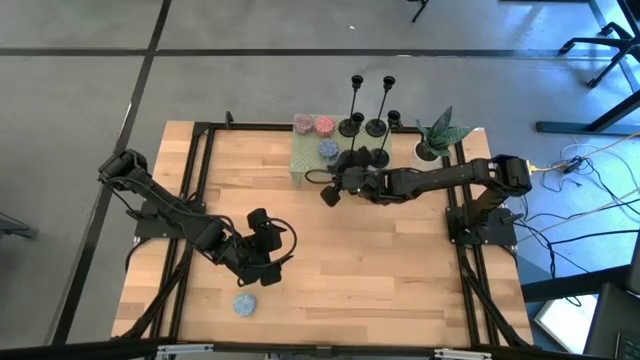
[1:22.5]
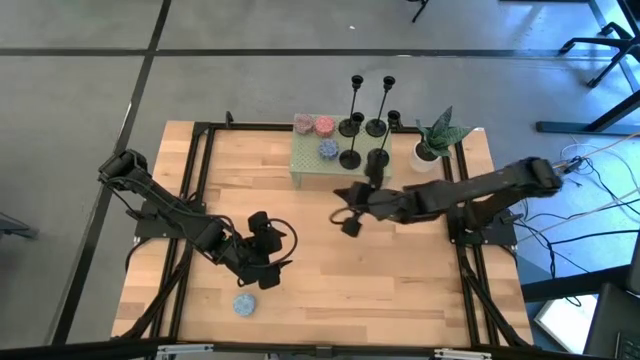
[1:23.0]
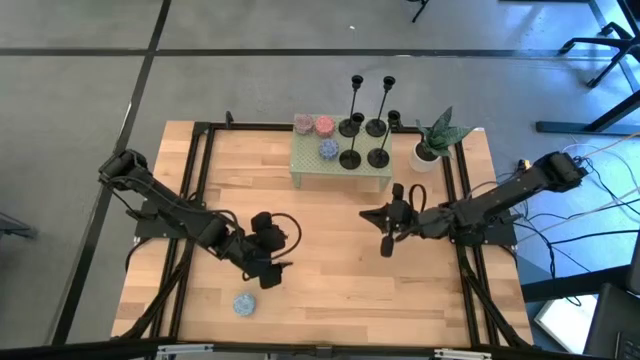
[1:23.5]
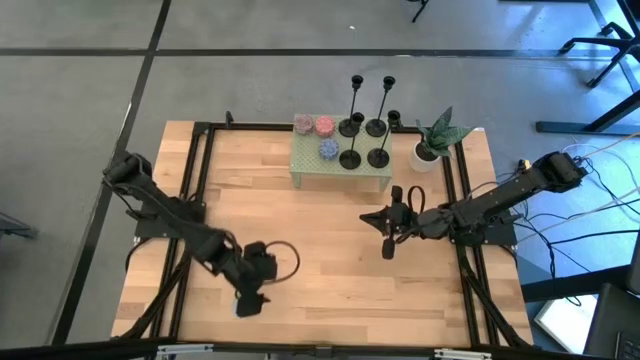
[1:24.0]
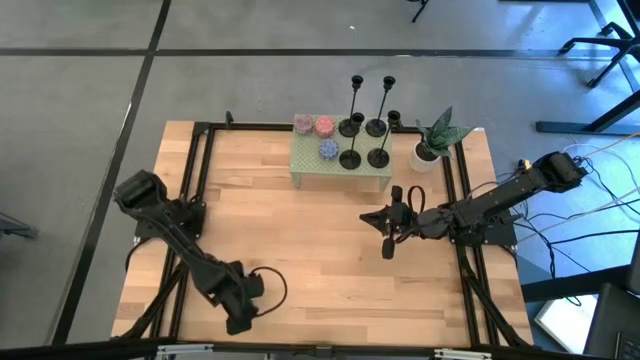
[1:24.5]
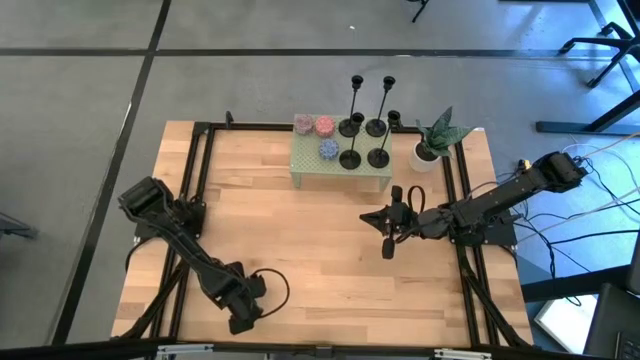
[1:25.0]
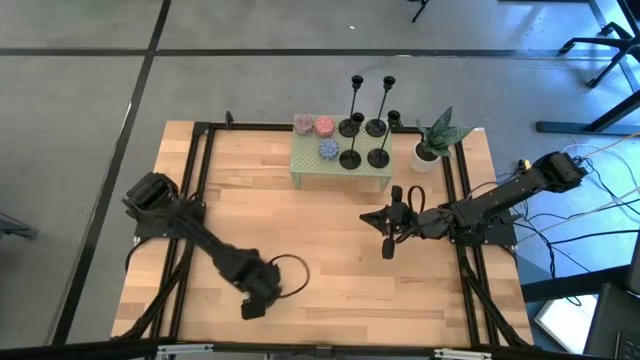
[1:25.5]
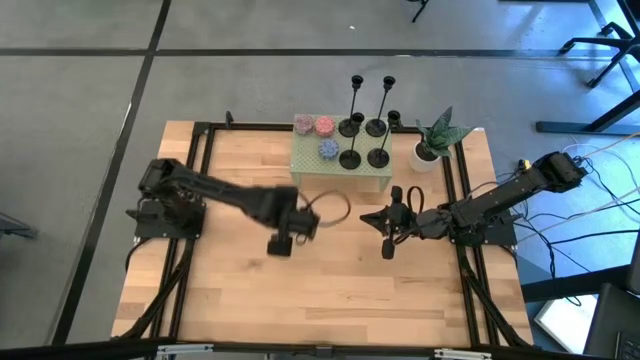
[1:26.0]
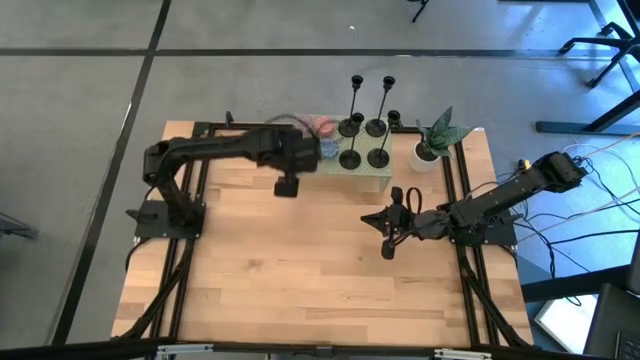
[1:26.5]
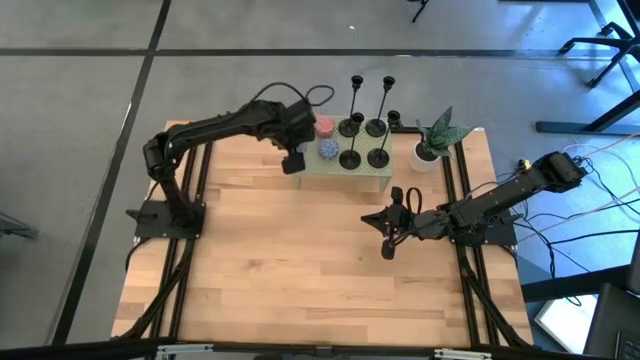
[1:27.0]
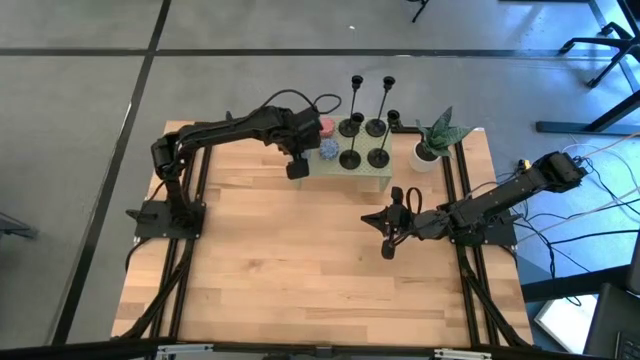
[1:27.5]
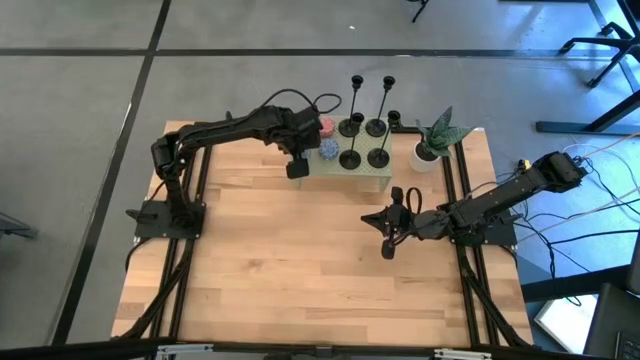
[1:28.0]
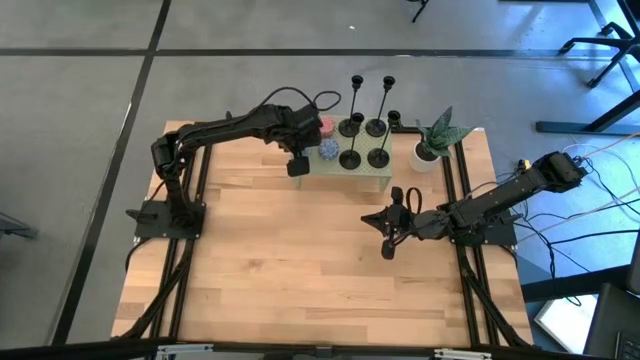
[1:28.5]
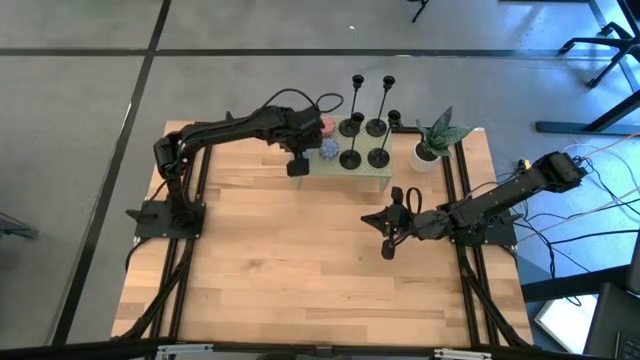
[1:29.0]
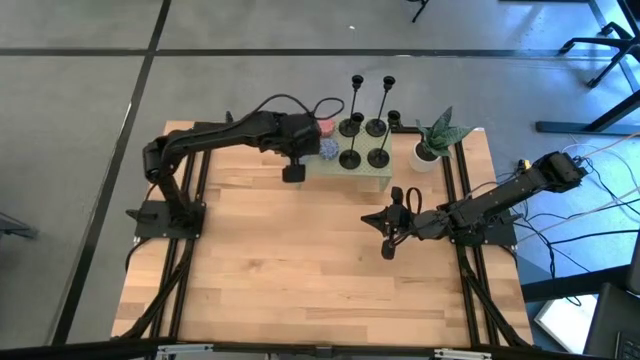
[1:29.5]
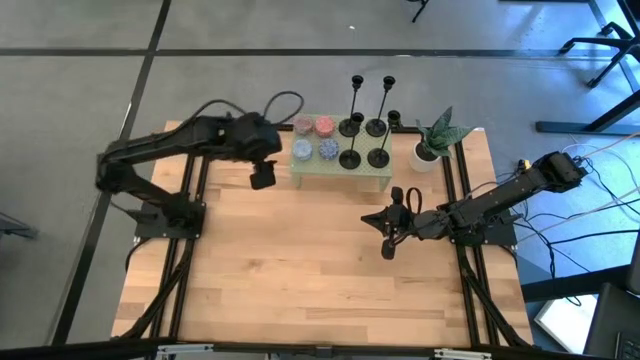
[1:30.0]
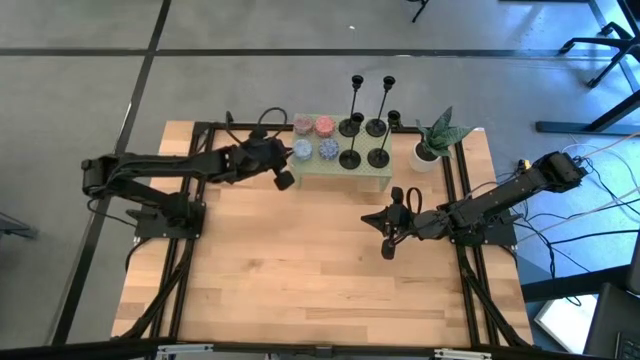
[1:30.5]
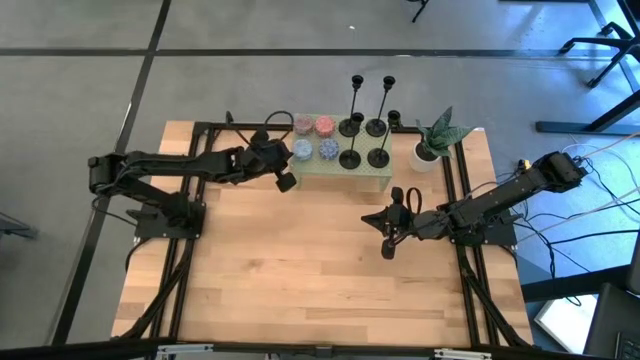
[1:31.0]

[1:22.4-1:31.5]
Task: Pick & Place candle stick holders
Align the light blue scented candle with the red scented candle on the shelf

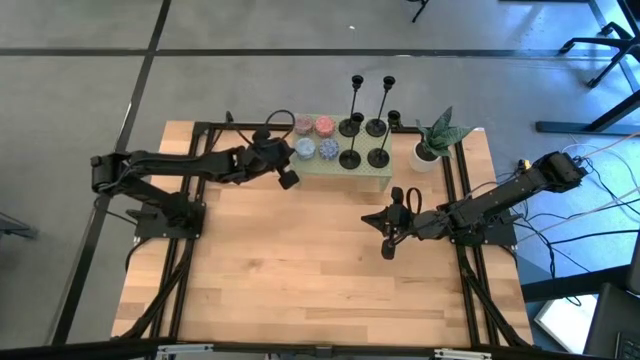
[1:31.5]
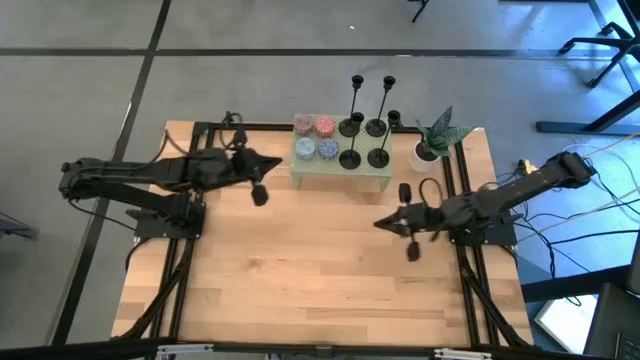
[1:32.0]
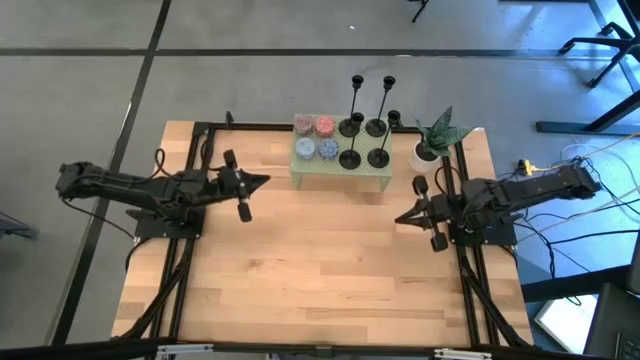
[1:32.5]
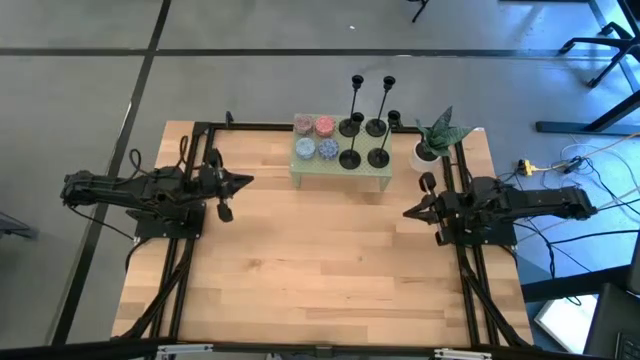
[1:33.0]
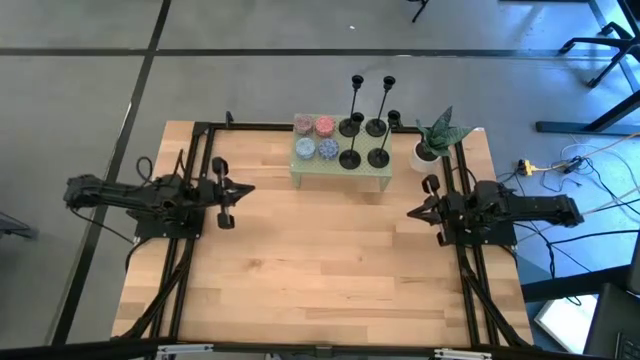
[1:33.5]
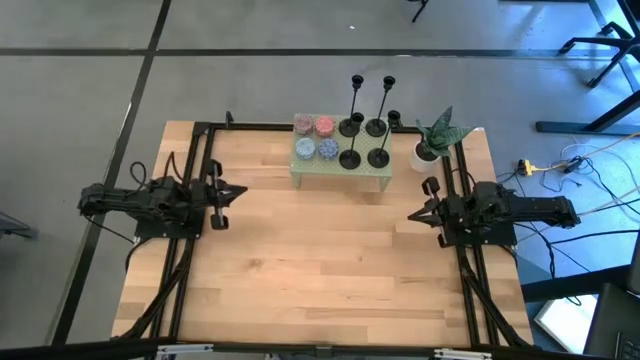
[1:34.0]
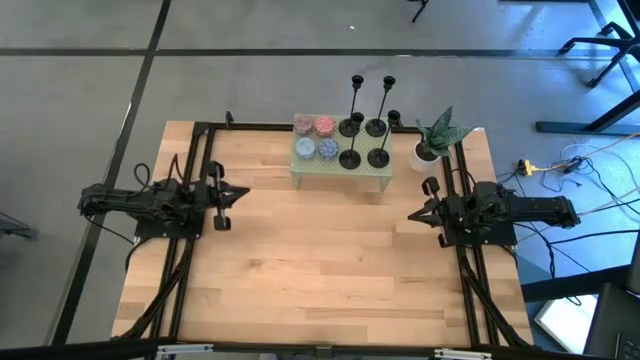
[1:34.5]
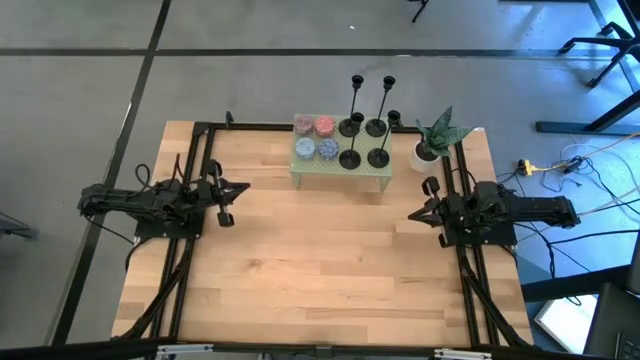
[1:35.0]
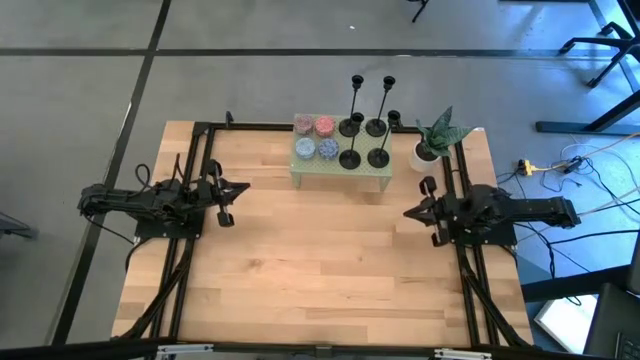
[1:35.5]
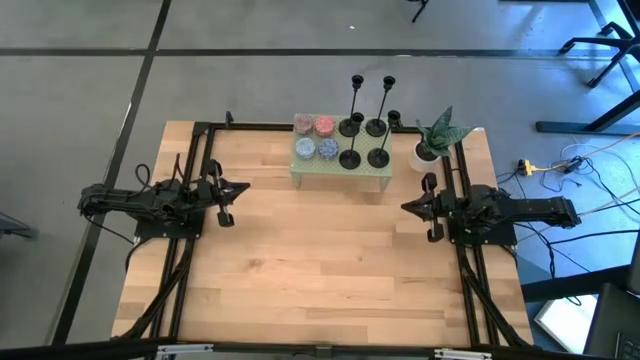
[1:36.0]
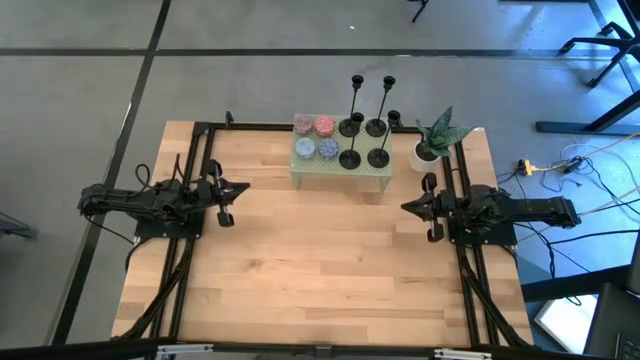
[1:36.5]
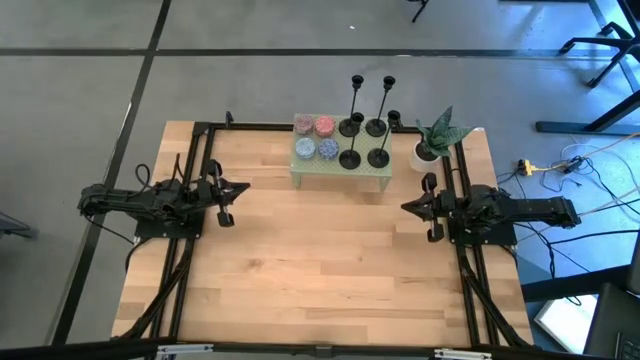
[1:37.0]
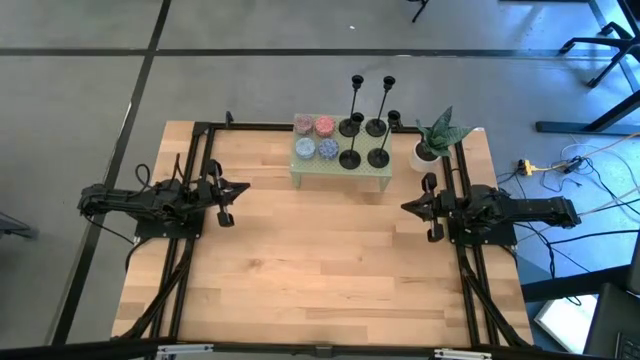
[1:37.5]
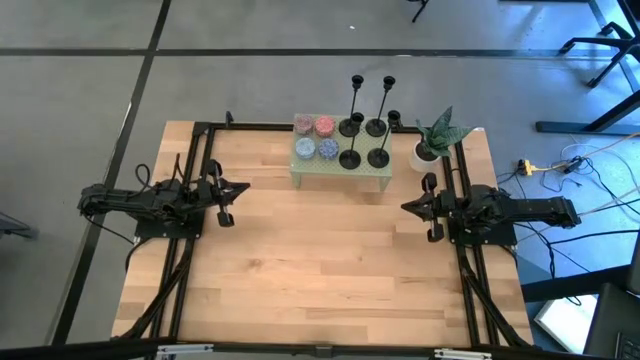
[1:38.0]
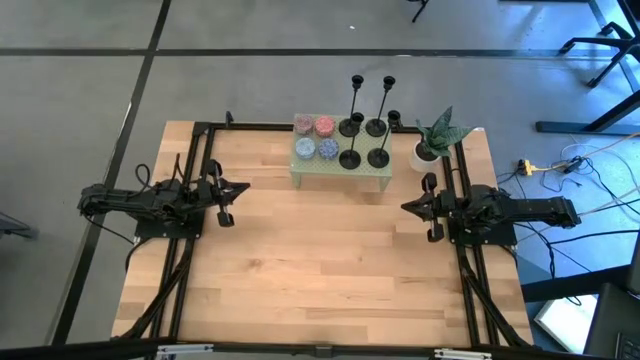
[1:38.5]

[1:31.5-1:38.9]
Return to Home Position

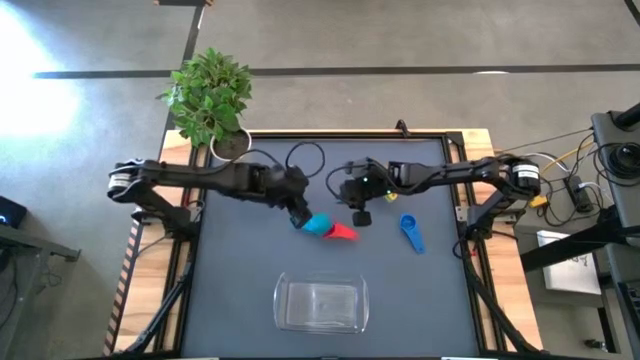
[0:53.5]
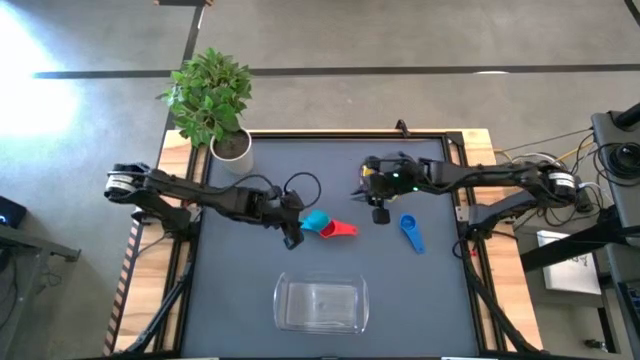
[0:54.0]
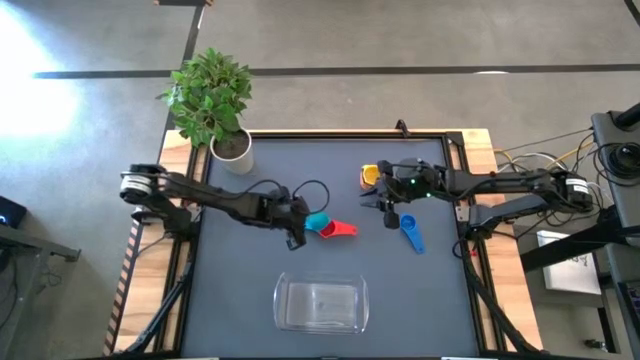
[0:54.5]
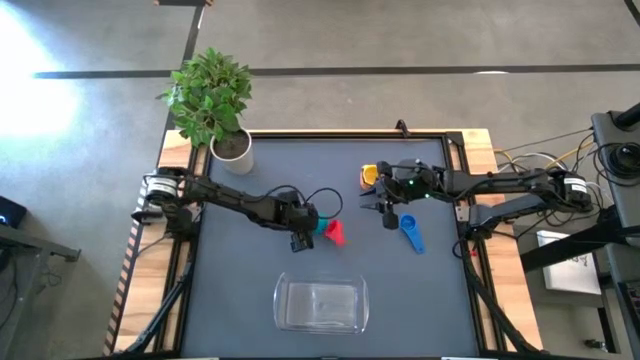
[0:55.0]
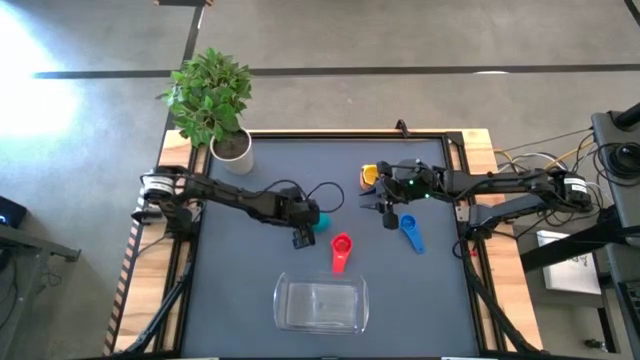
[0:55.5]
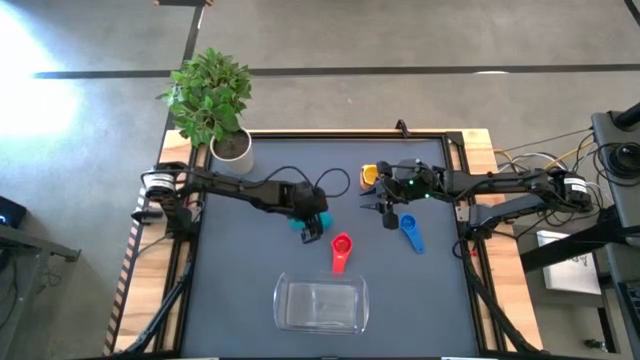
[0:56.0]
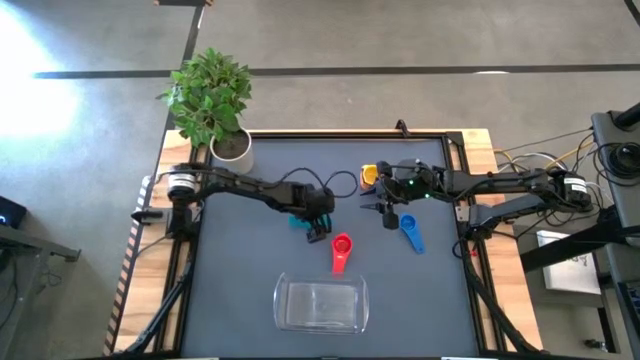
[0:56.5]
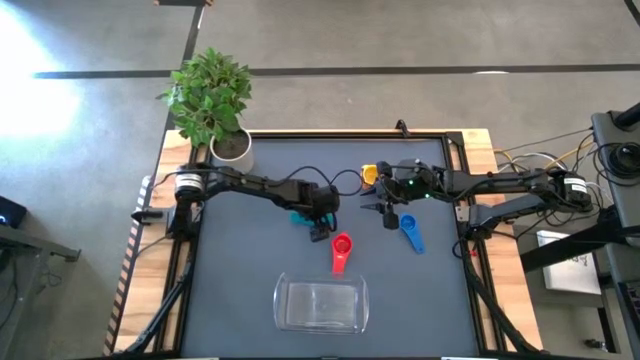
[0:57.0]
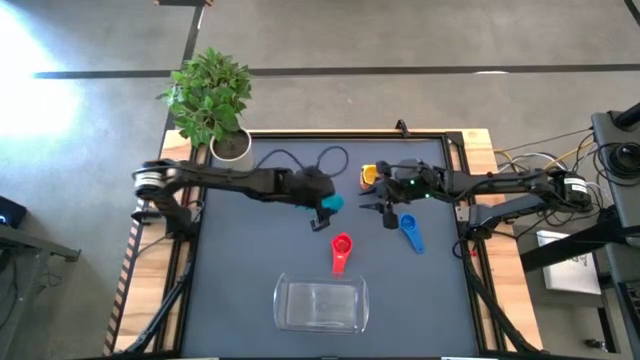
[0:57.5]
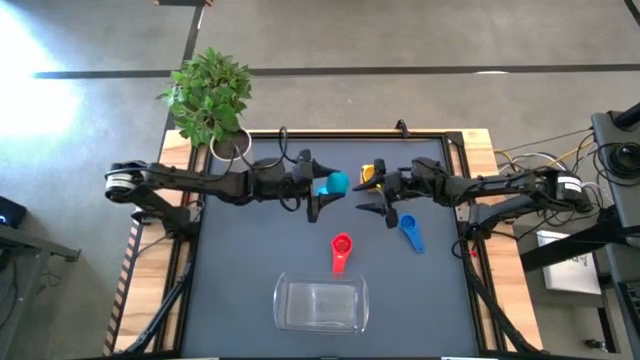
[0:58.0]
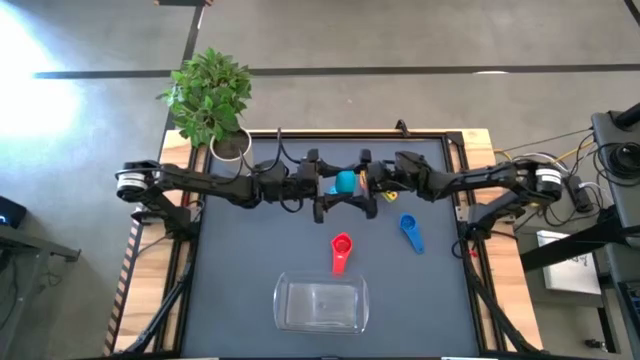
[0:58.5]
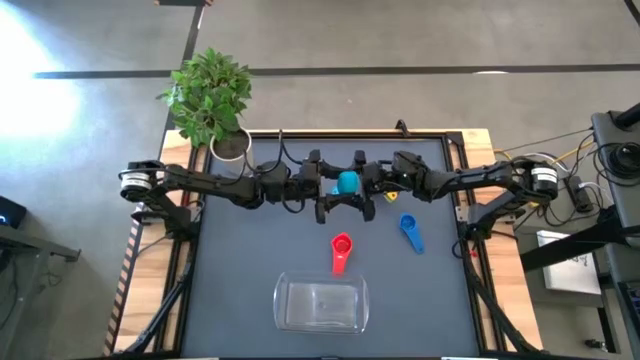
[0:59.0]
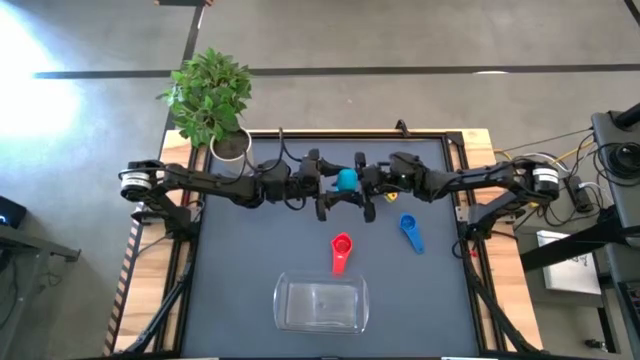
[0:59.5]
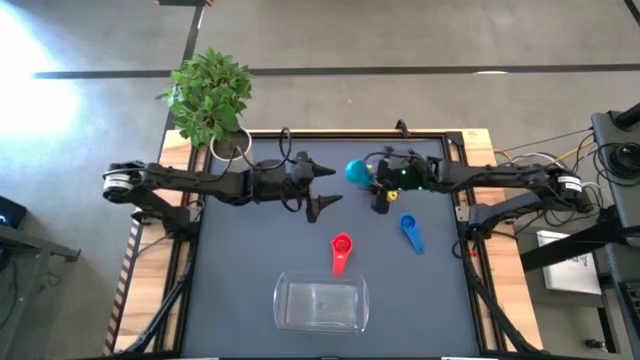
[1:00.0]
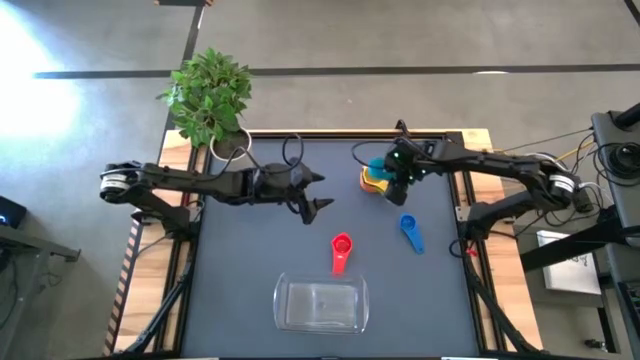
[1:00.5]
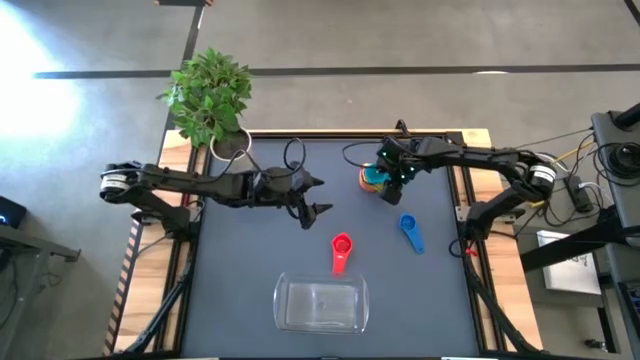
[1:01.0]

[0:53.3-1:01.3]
Task: Nest measuring cups in basket
Stack the light blue measuring cup on top of the yellow measuring cup
